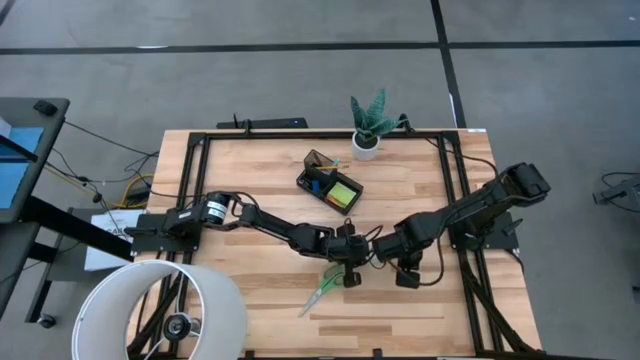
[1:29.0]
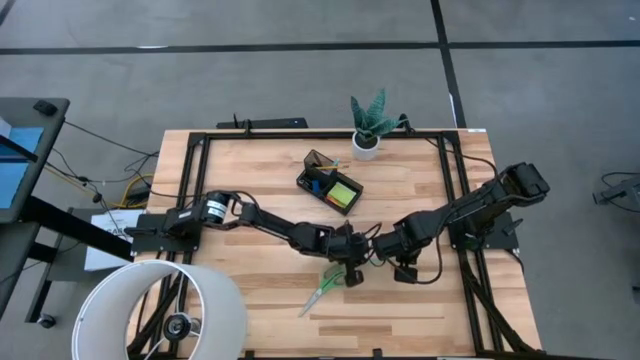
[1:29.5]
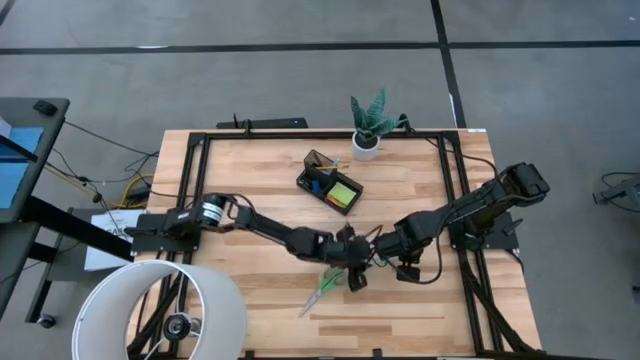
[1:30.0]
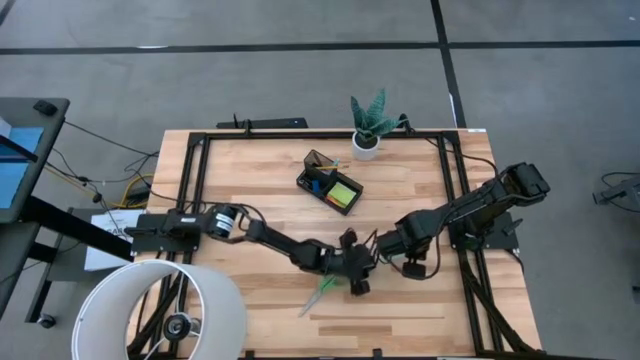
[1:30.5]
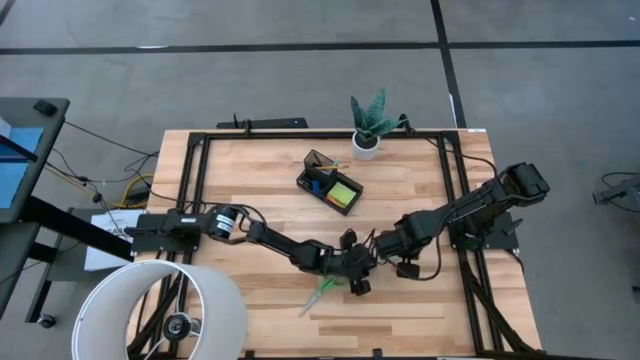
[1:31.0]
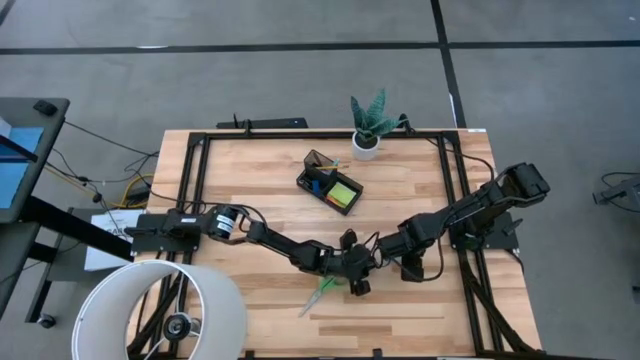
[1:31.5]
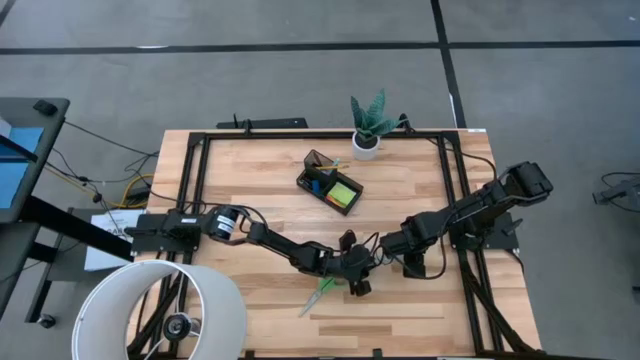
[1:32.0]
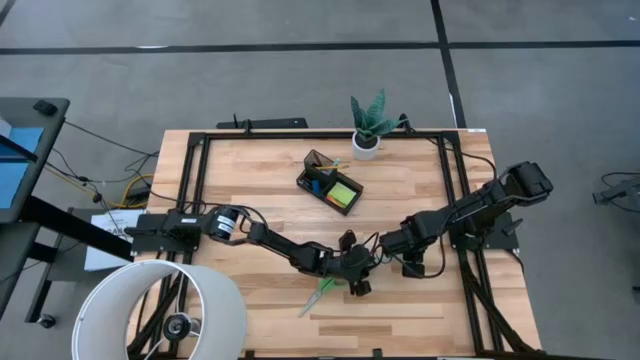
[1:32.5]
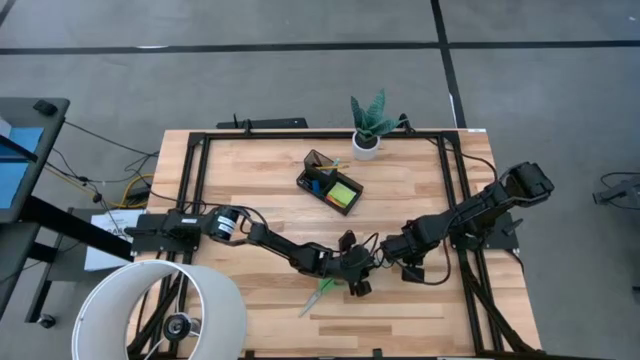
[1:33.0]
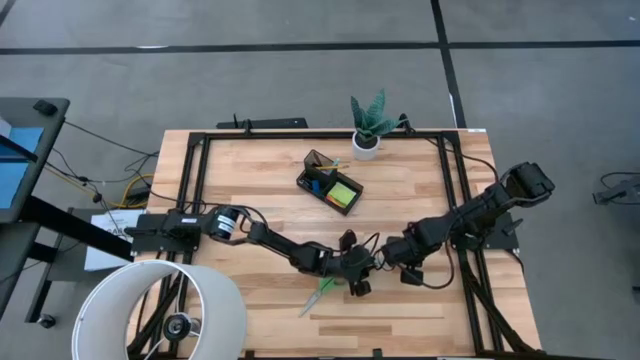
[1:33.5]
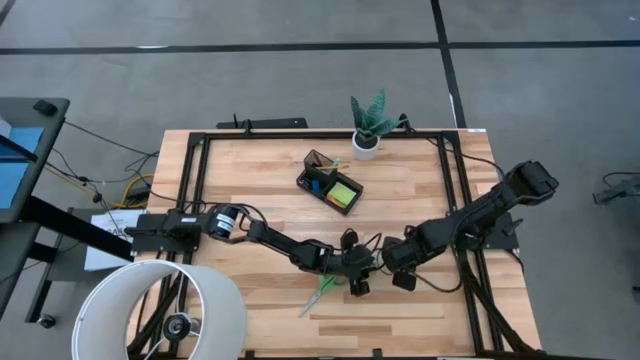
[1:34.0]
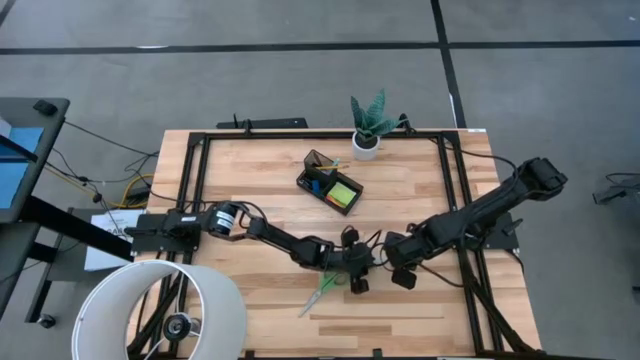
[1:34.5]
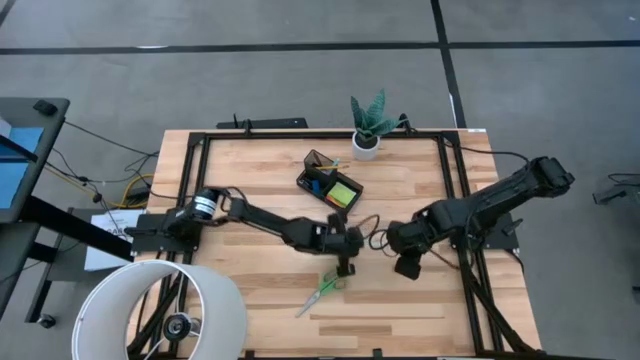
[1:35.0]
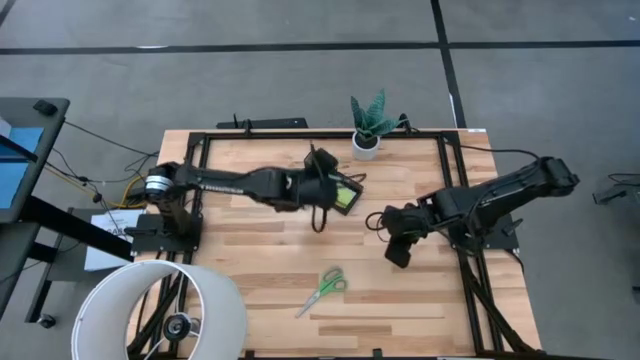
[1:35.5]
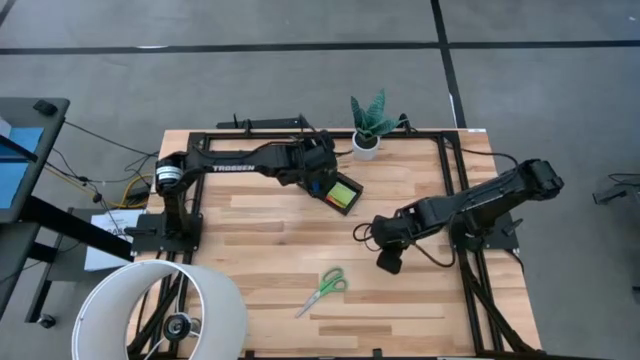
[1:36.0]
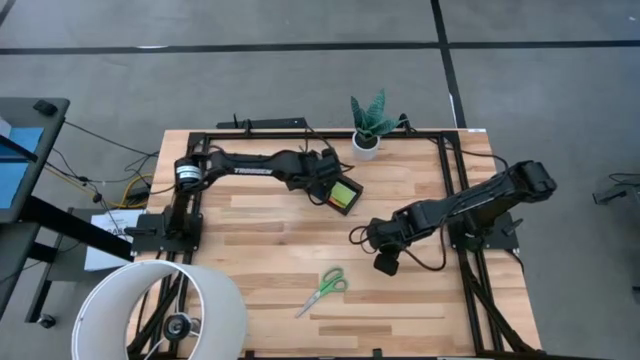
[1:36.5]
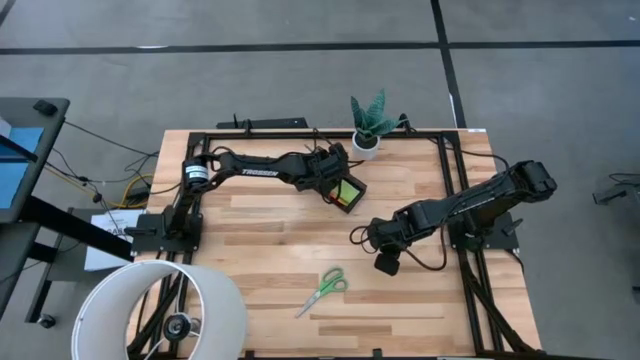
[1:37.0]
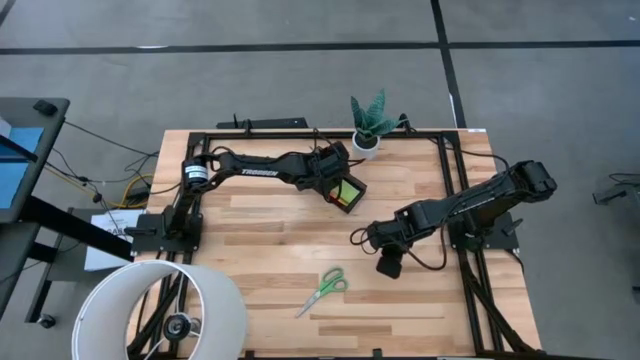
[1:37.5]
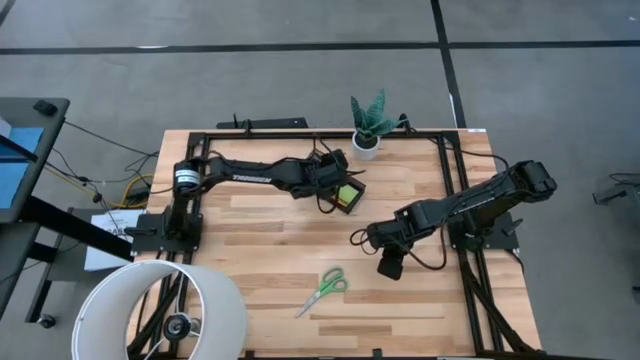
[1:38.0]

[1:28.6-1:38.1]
Task: Pick and place office supplies into organizer
Put the light blue pencil into the black desk organizer

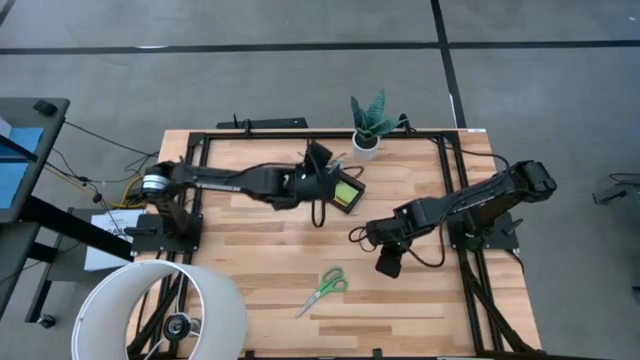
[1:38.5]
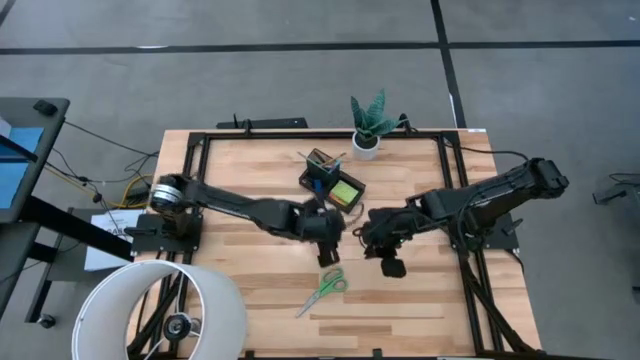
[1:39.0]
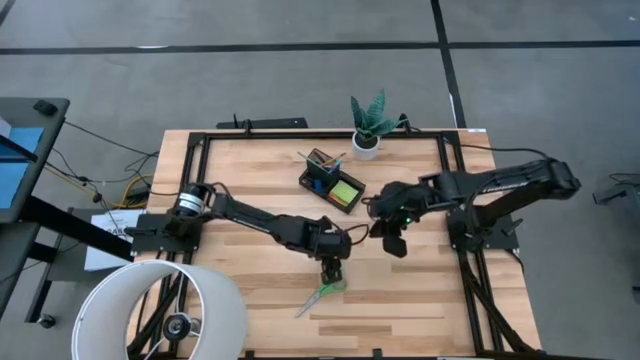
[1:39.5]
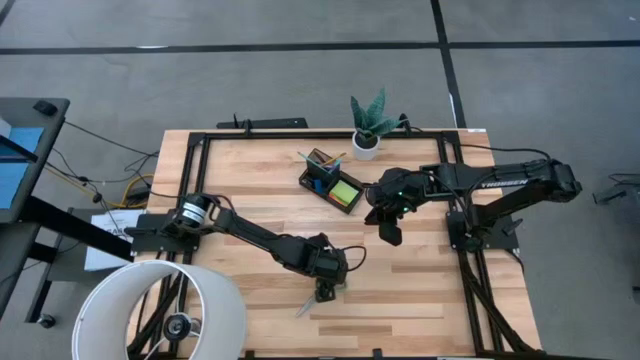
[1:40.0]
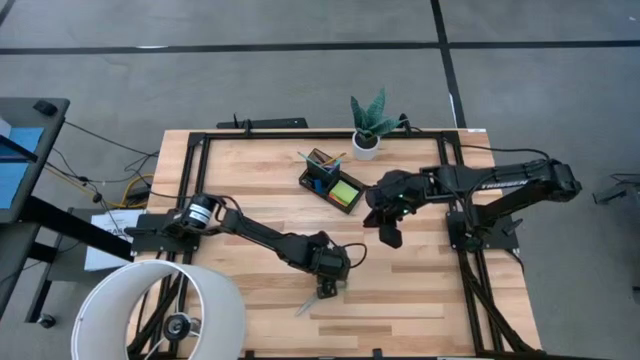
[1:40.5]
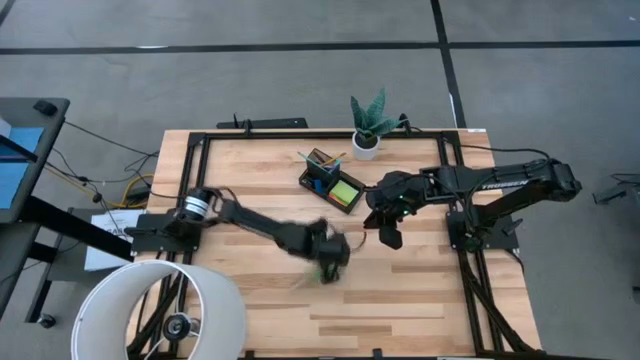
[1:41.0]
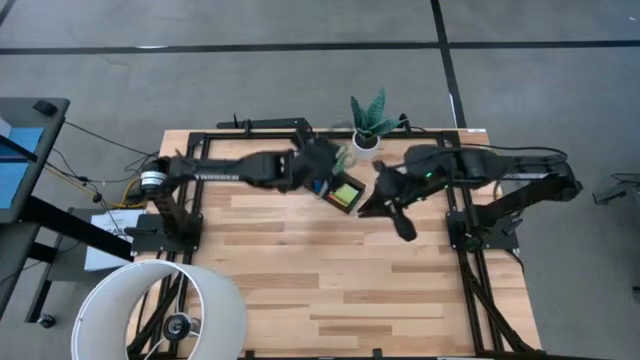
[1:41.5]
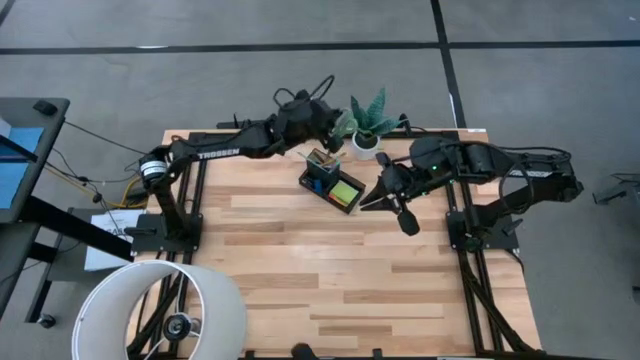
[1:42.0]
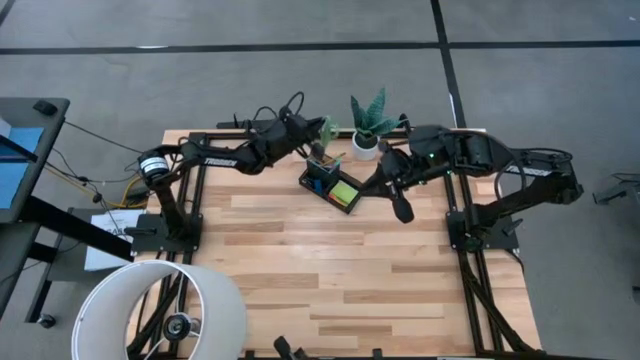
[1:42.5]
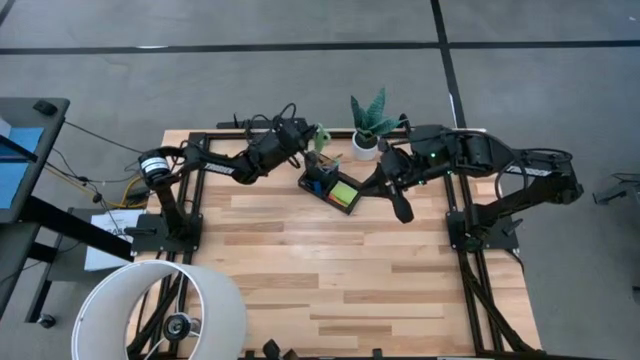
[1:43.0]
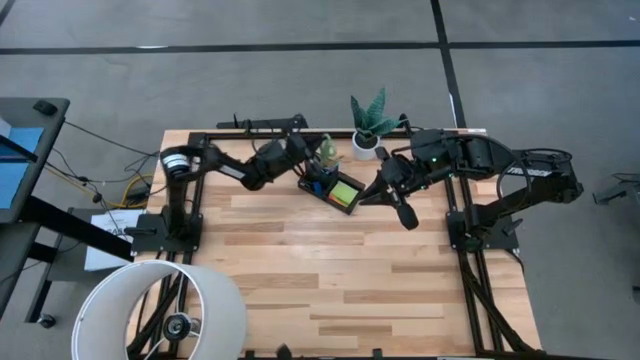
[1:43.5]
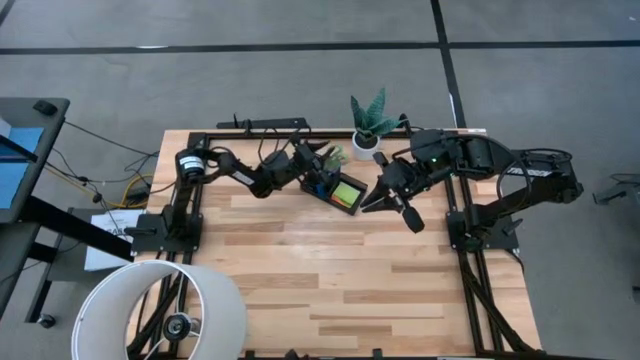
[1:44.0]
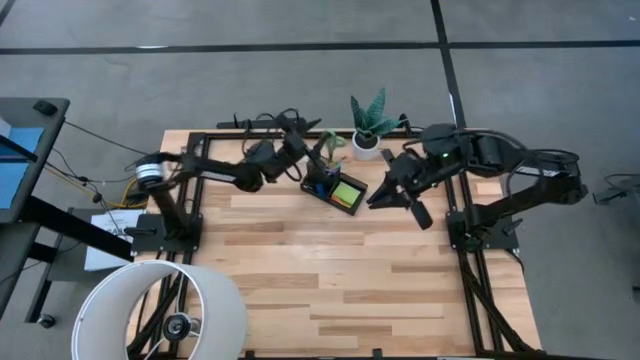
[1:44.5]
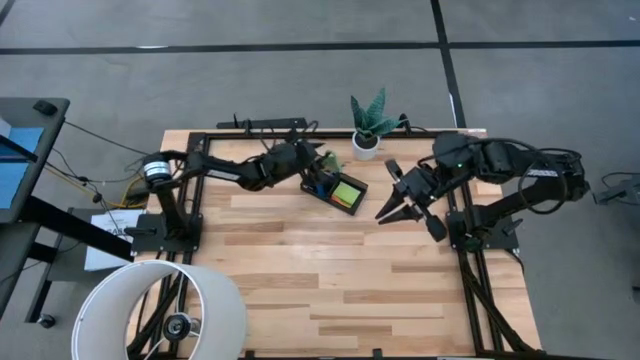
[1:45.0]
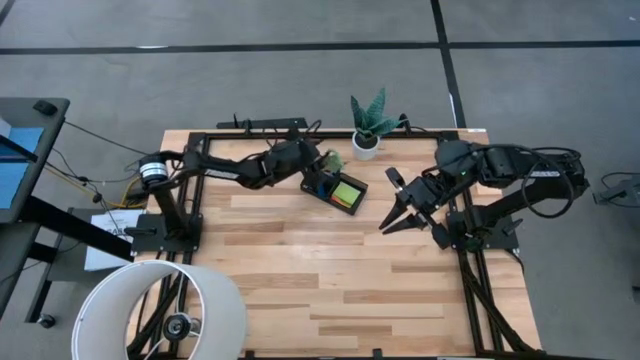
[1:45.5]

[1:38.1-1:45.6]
Put the green scissors into the black desk organizer

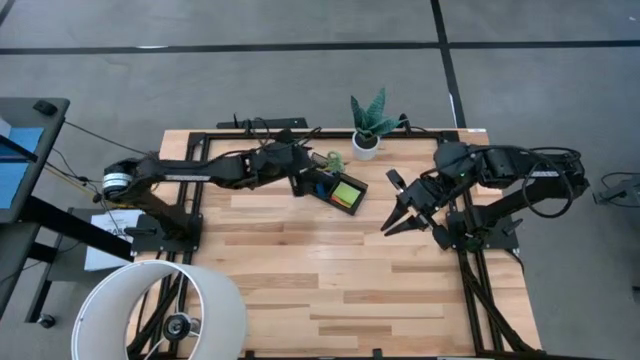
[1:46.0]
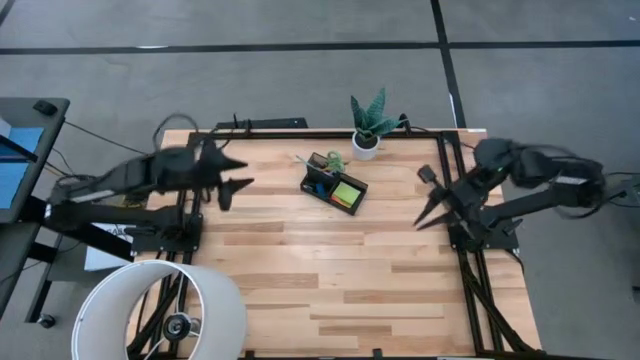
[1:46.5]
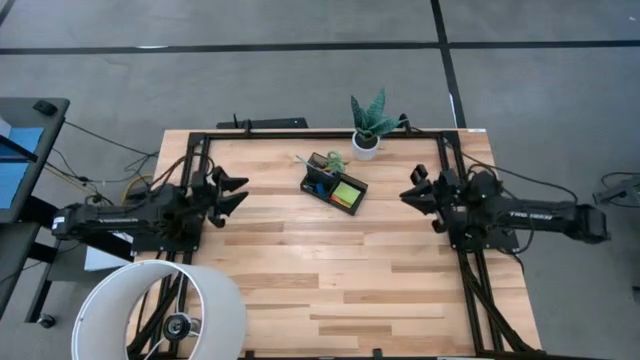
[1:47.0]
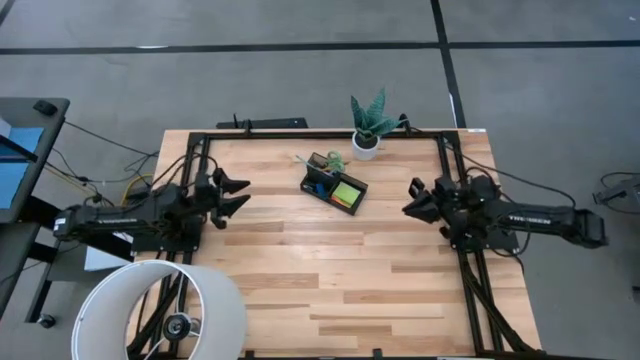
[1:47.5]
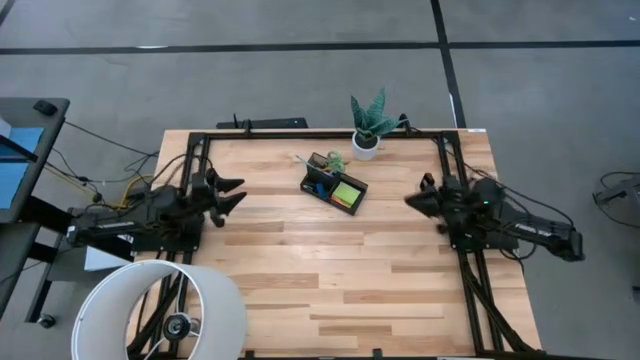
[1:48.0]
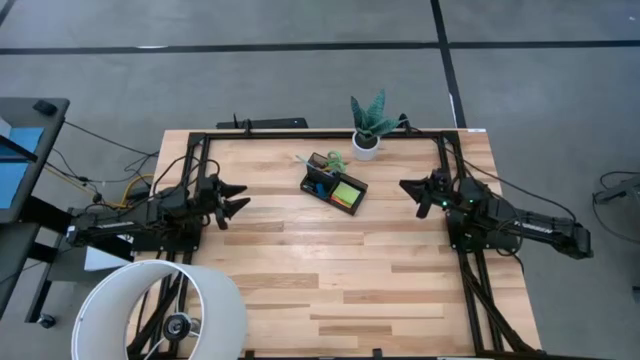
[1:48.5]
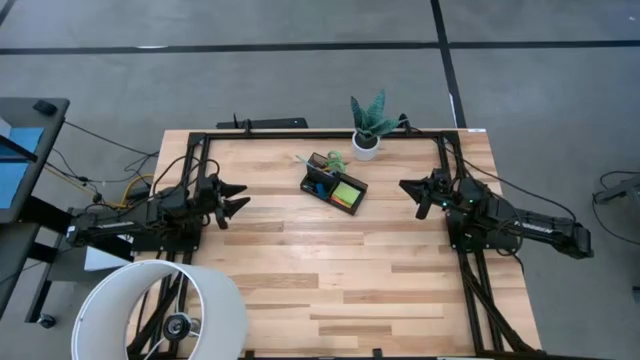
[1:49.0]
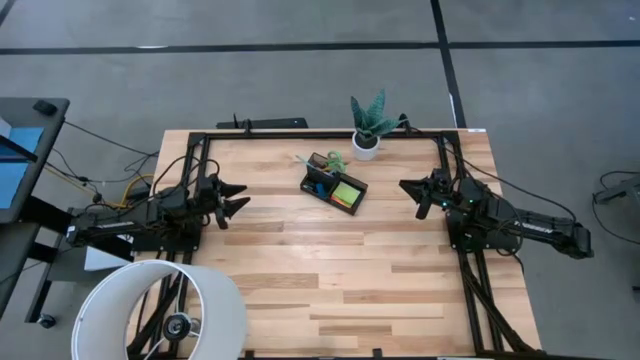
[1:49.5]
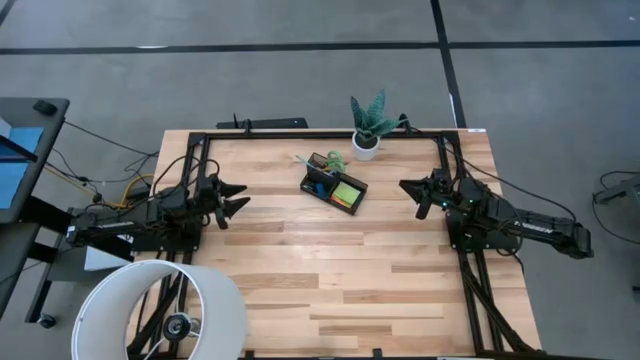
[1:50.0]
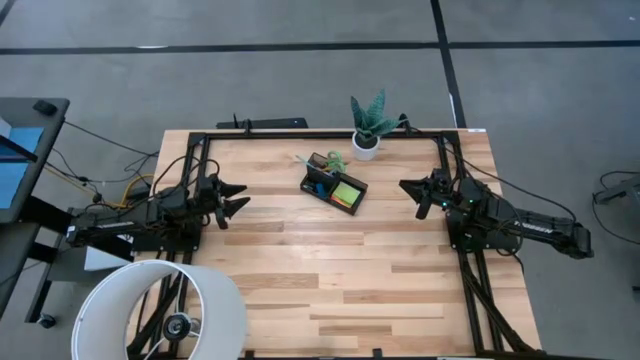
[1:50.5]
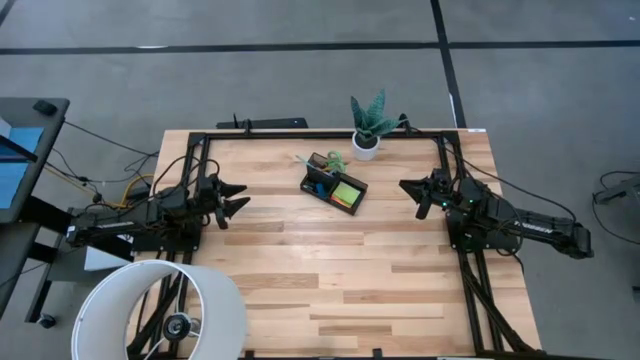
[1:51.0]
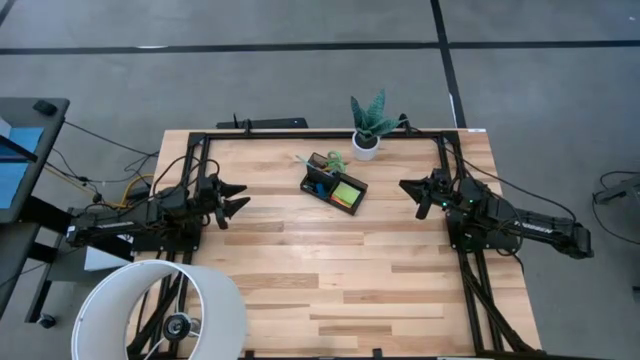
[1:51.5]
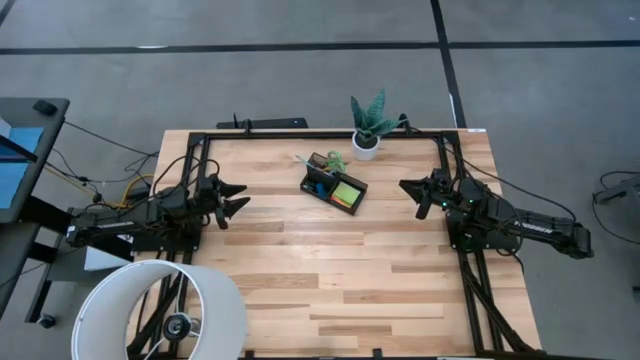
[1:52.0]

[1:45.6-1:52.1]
Return to Home Position
